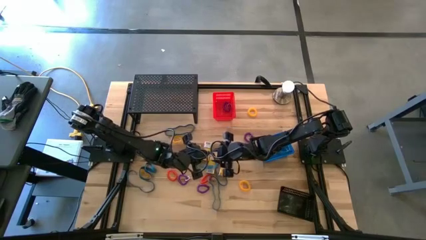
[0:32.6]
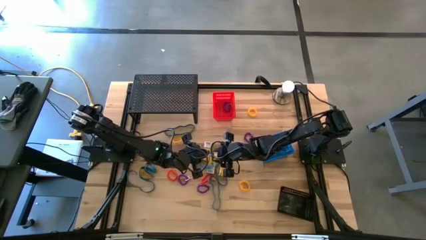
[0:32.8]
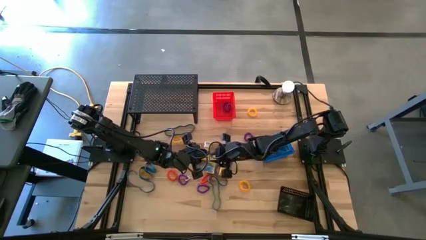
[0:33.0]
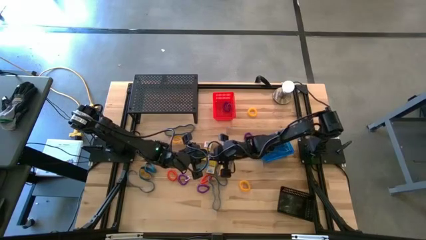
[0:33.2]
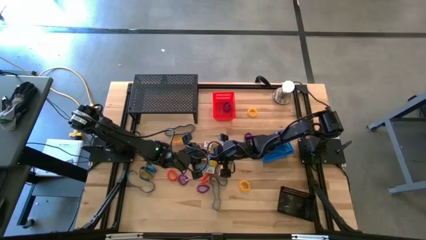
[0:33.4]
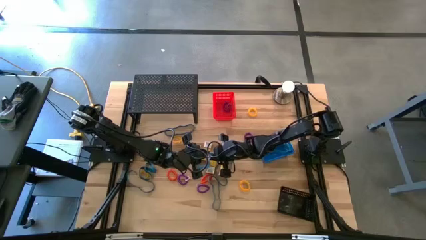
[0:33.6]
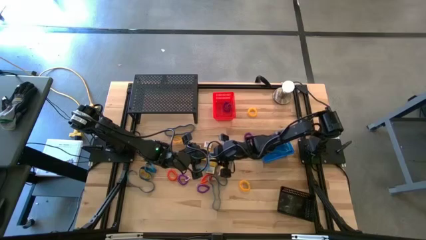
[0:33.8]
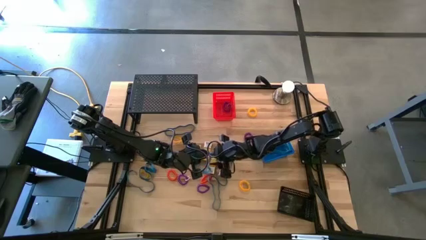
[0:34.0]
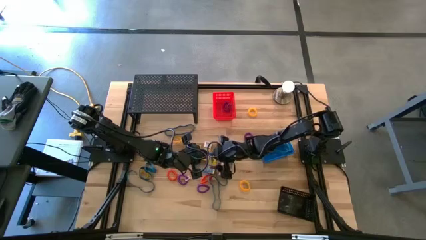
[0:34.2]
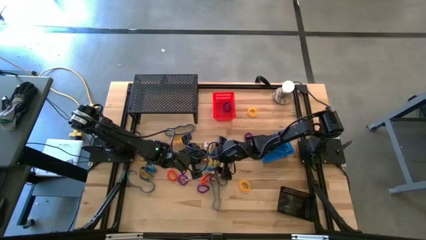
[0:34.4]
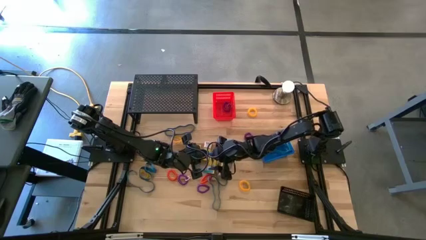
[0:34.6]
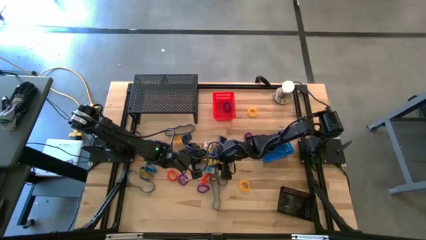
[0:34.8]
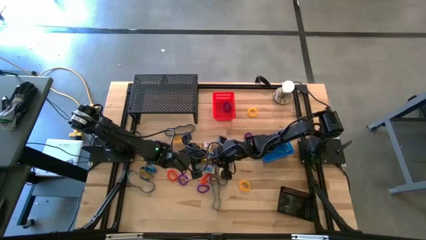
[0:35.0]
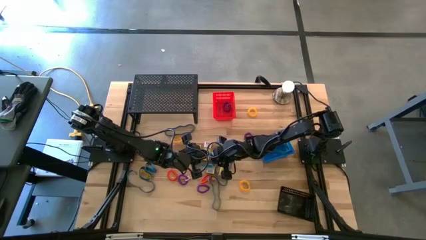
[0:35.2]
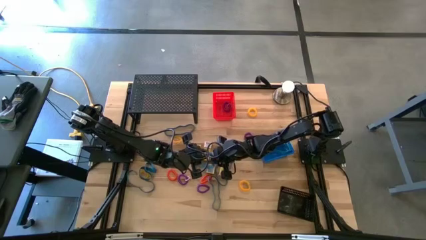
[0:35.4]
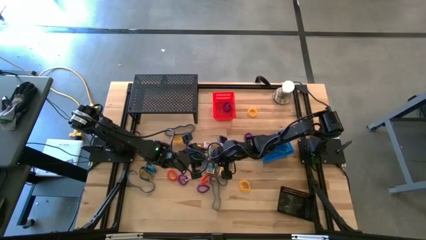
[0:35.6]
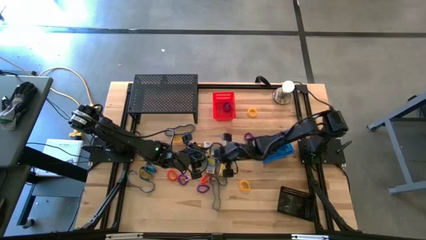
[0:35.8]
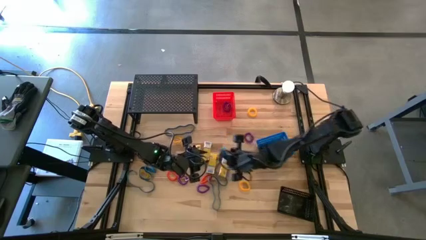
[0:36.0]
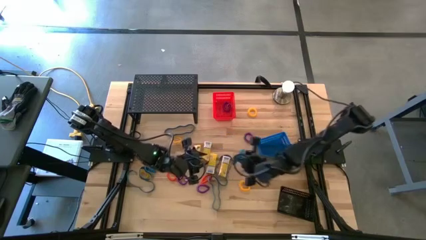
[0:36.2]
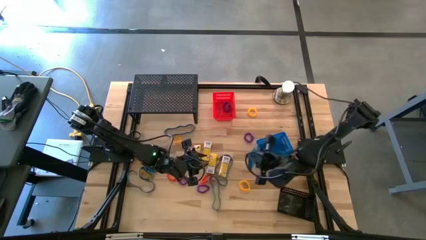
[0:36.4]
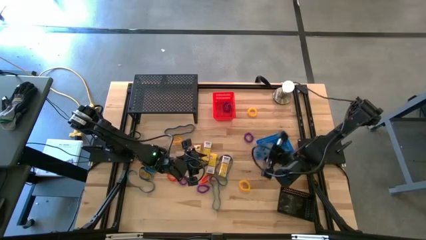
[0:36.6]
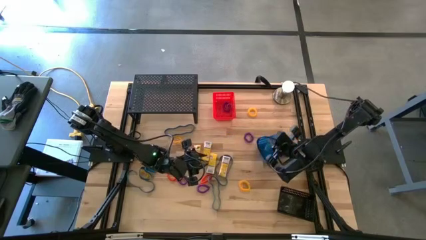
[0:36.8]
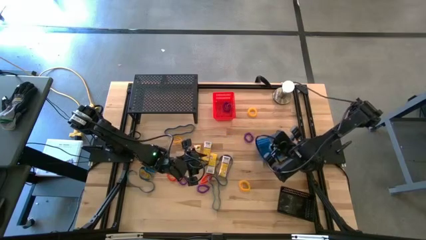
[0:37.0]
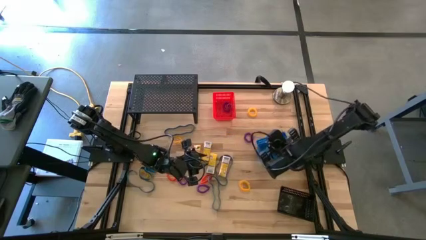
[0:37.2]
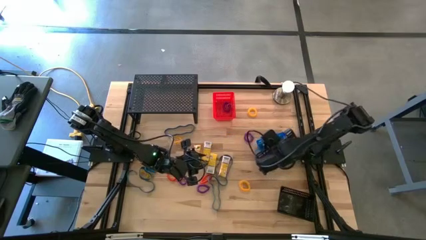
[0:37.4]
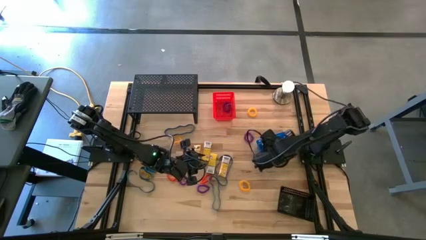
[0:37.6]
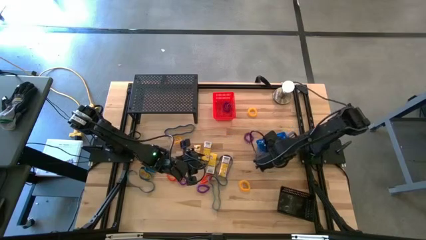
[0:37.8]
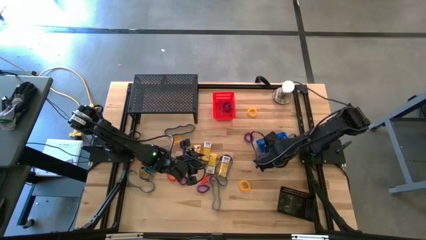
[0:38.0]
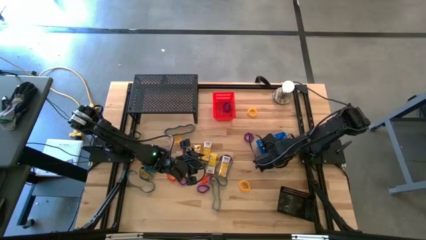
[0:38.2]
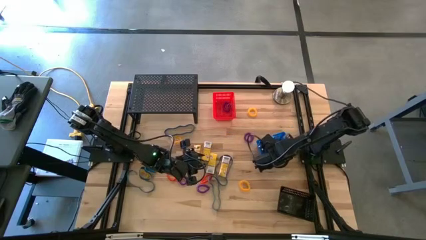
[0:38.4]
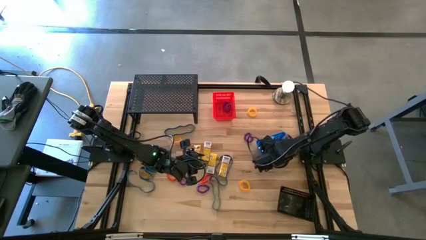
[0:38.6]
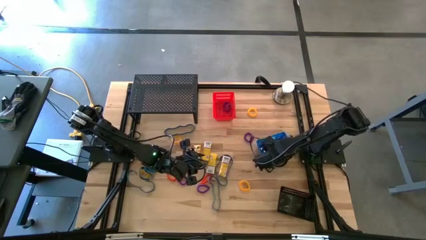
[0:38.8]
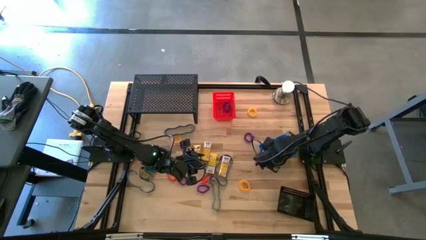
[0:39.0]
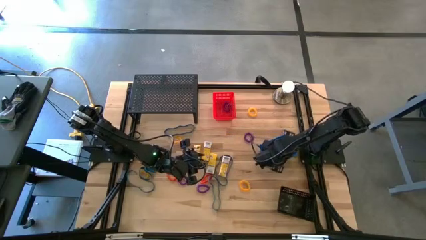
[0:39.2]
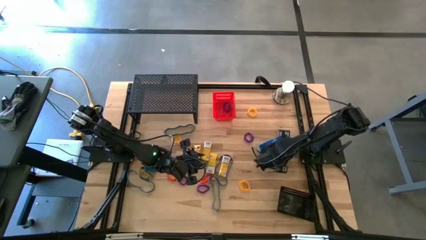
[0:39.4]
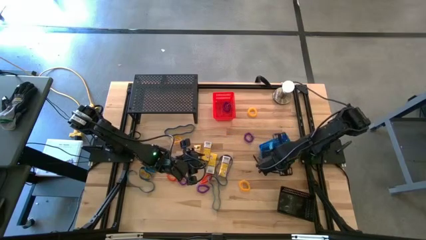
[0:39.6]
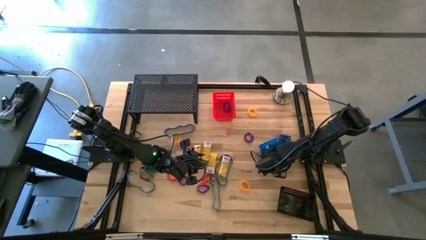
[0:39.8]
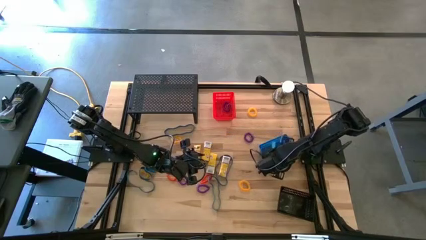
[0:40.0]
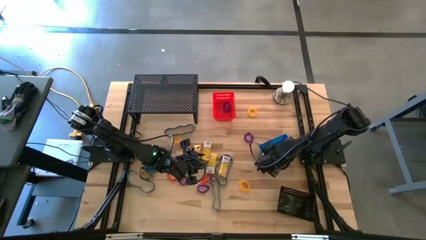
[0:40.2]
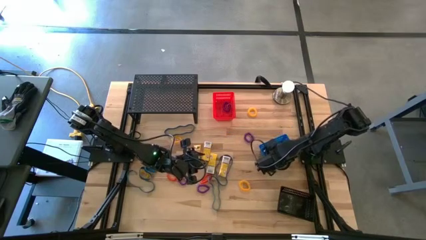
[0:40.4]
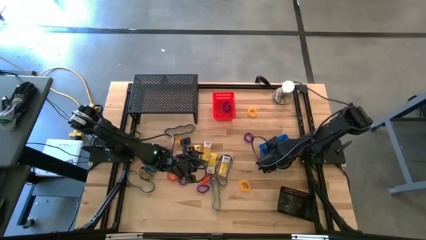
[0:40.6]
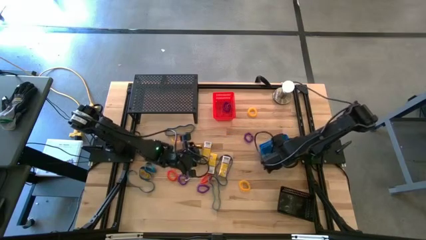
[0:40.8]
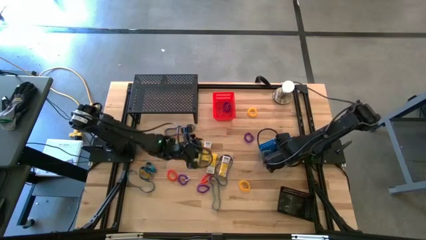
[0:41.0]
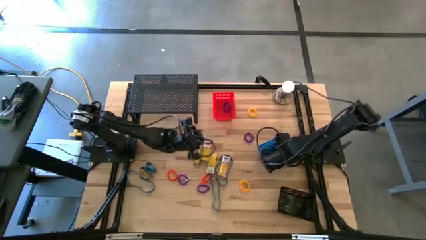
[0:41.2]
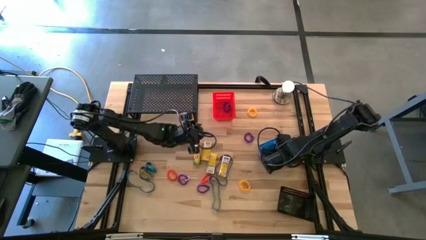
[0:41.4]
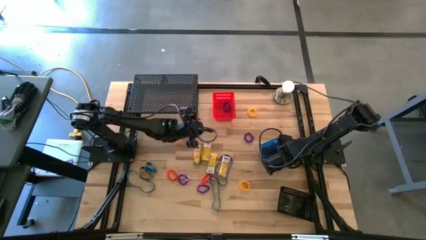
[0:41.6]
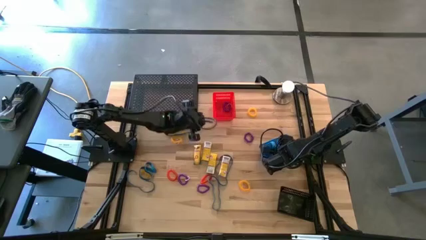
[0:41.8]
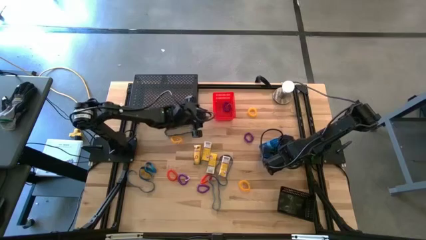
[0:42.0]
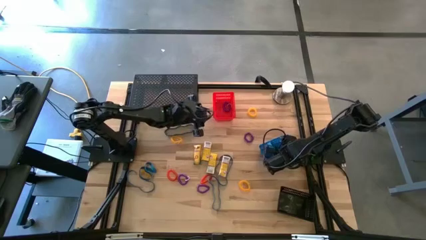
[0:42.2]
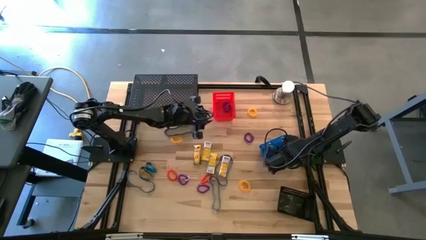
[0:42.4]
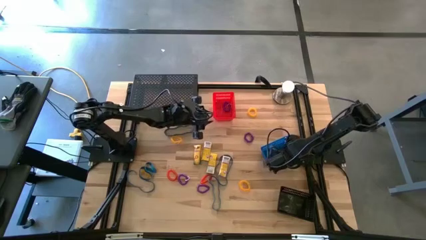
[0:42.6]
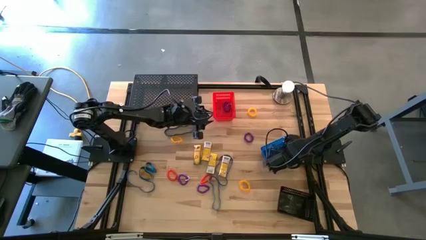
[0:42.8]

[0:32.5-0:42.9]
Task: Pick & Place Office Desk Supplies
Put the blue rubber band into the blue bin

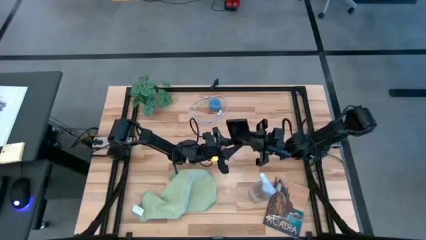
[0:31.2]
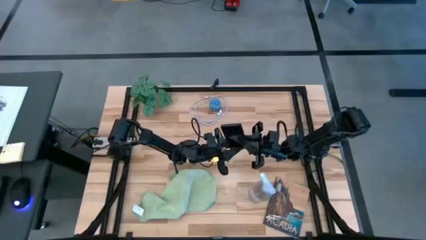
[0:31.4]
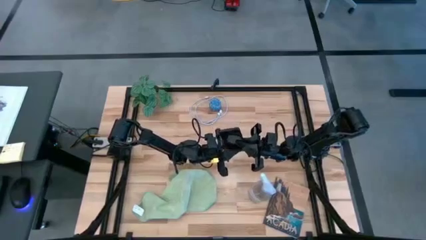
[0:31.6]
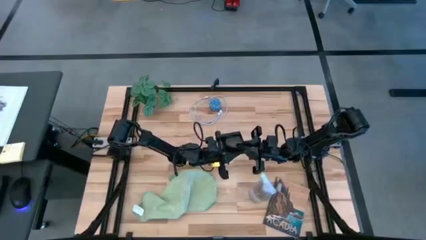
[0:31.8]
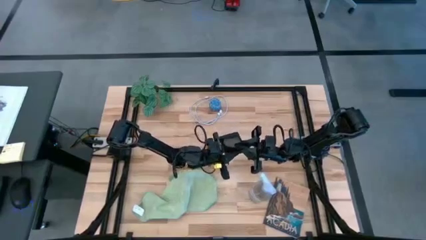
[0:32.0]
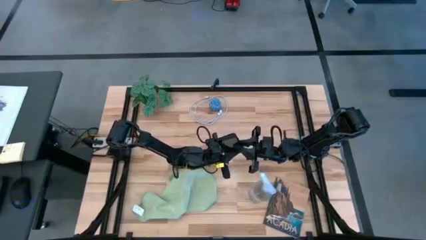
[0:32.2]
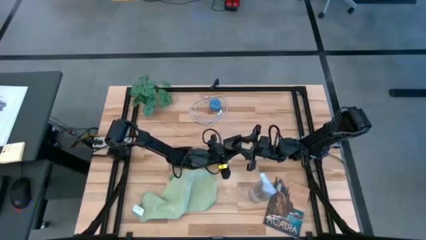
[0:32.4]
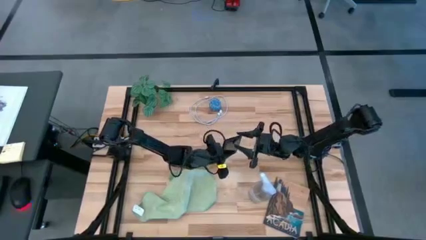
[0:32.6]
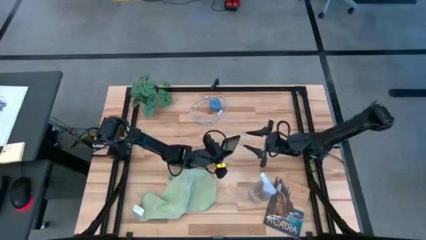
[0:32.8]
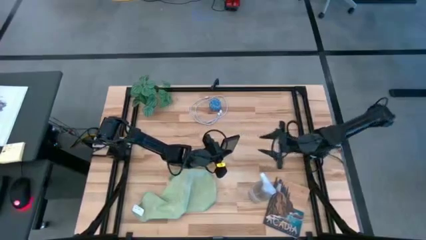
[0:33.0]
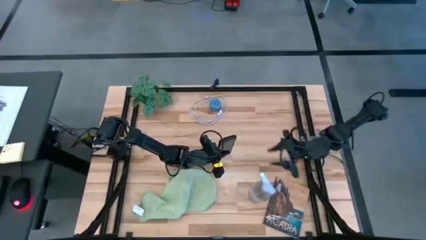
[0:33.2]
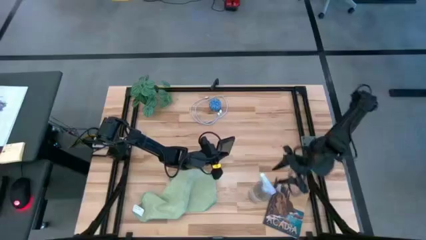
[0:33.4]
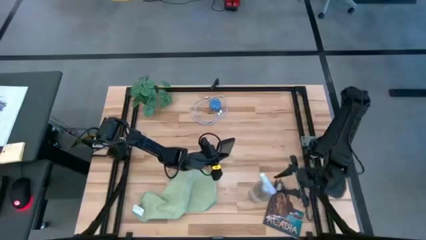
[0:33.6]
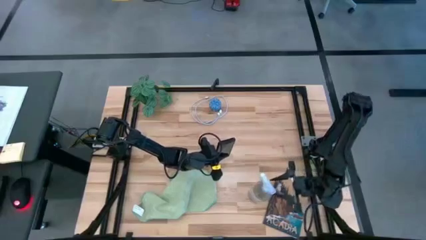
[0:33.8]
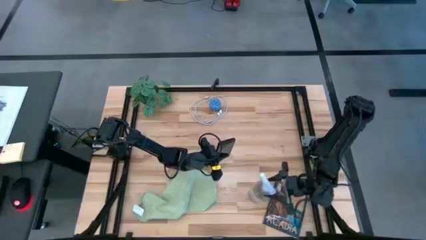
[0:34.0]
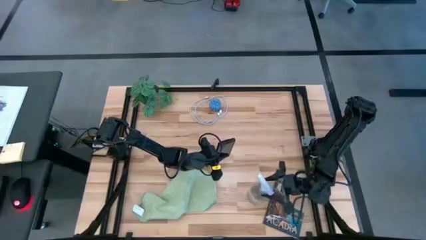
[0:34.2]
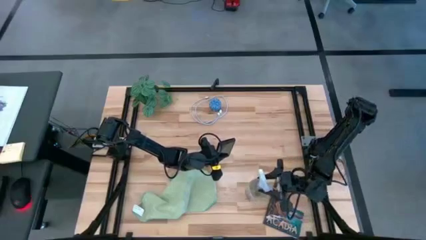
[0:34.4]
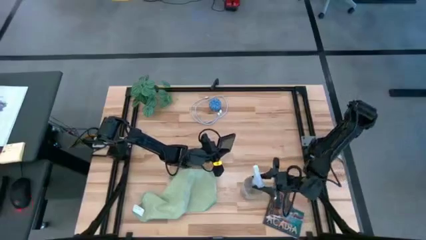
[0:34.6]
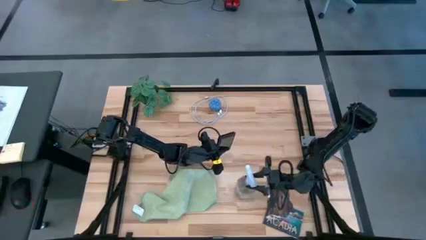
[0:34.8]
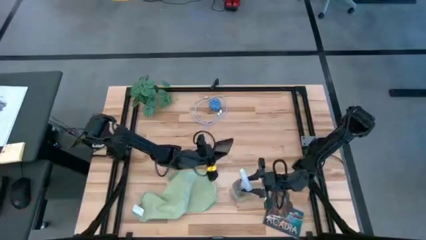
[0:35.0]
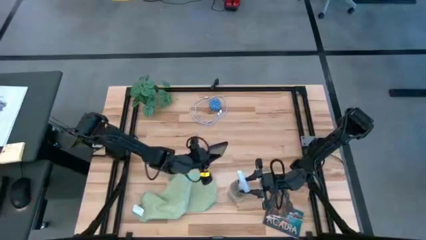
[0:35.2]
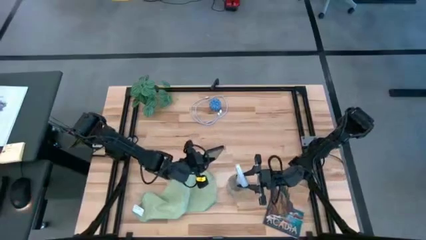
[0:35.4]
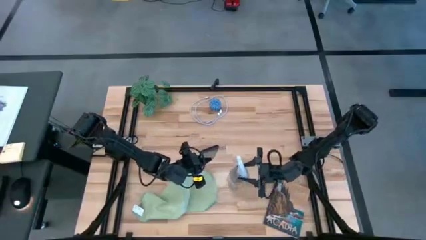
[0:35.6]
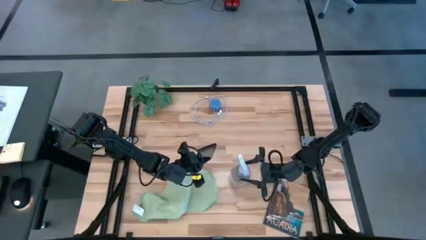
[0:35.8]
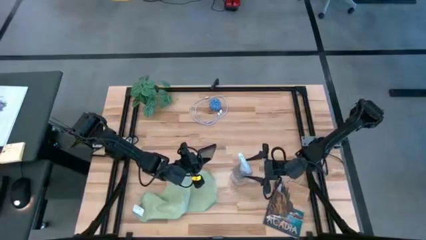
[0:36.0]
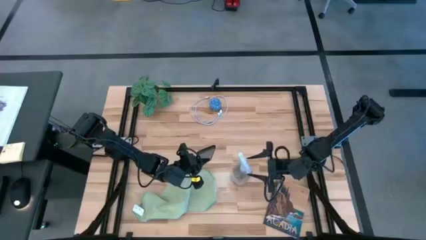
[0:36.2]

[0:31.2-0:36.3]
Task: Apply microfiber cloth
Spray the phone using the spray bottle

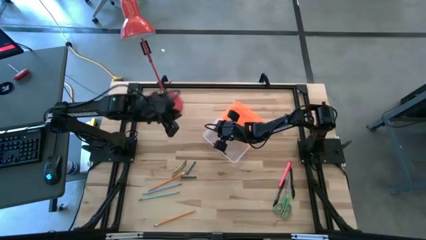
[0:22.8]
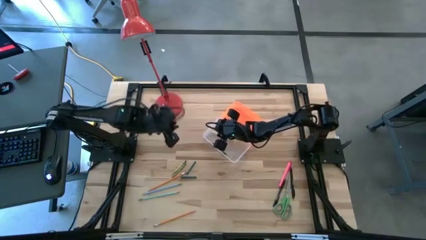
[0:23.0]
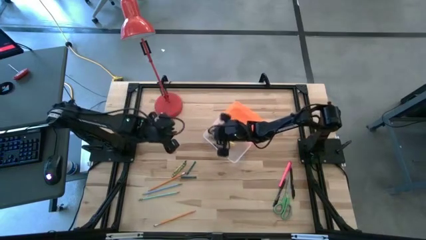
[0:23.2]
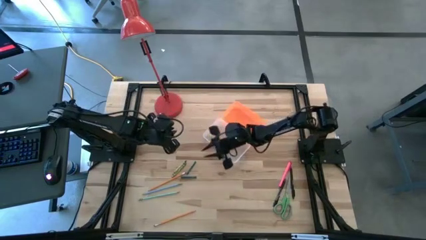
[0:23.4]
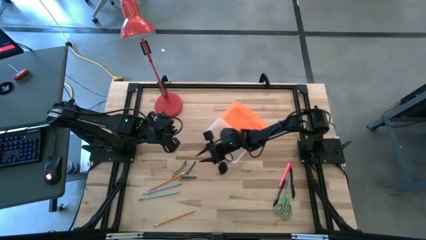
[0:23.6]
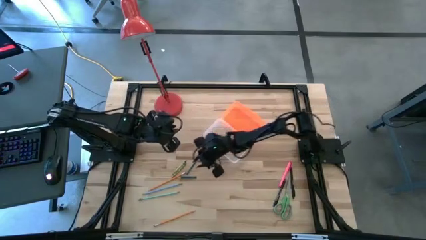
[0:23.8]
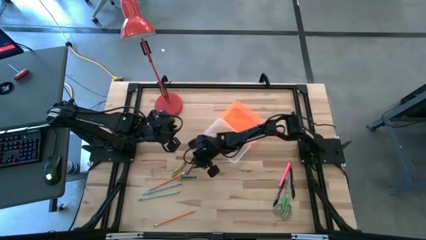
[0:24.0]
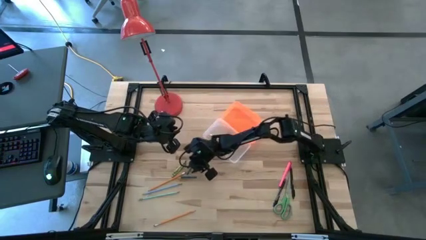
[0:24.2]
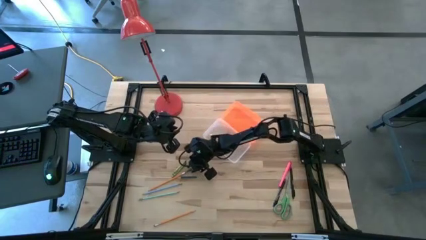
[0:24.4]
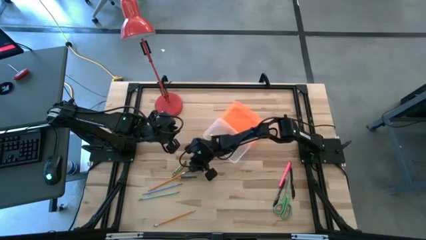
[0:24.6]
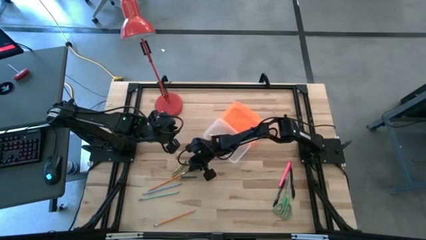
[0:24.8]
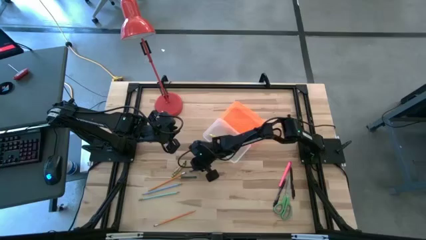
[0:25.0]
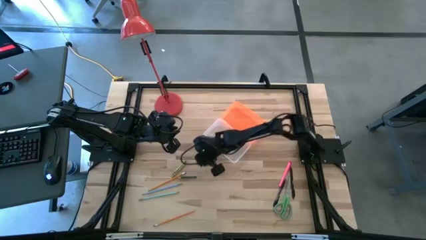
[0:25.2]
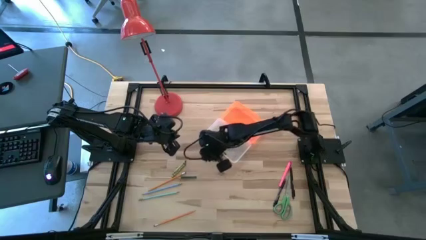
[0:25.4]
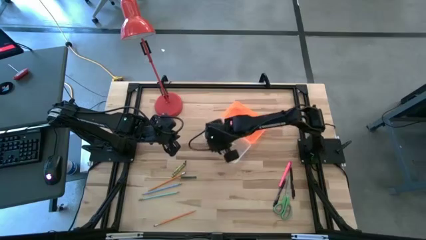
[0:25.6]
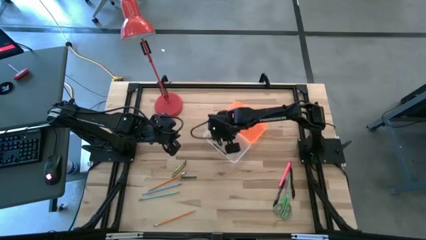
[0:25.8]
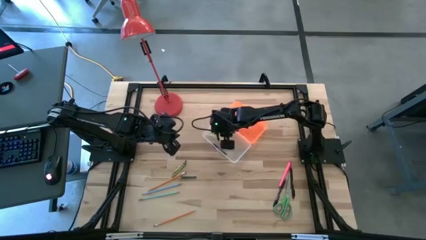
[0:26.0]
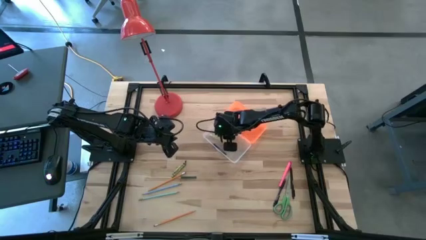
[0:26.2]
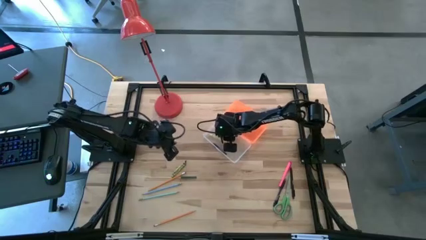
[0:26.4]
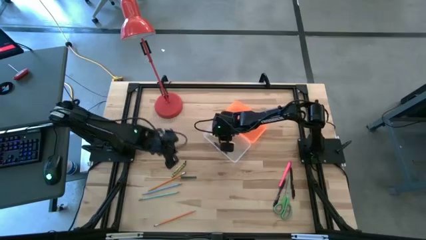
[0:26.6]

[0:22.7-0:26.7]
Task: Pick & place school supplies into a supply box
Put the top green crayon into the supply box
